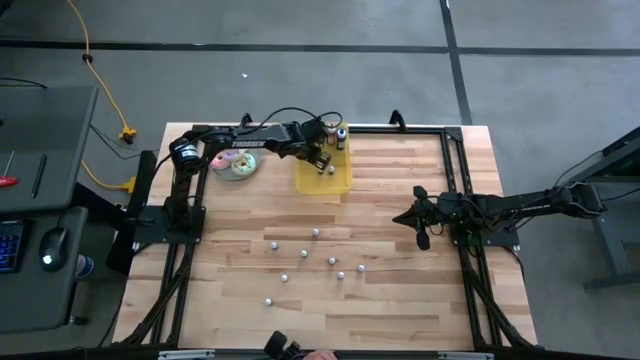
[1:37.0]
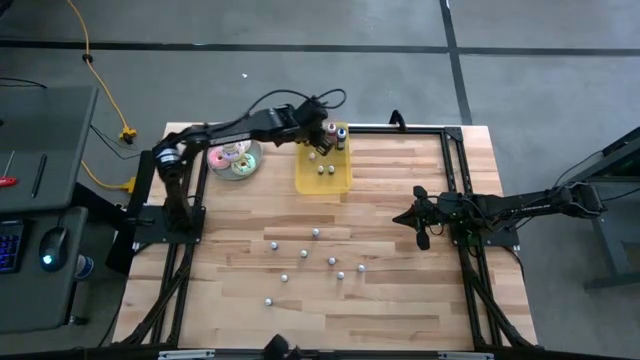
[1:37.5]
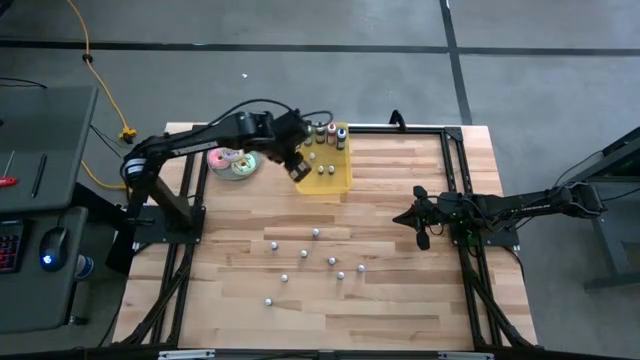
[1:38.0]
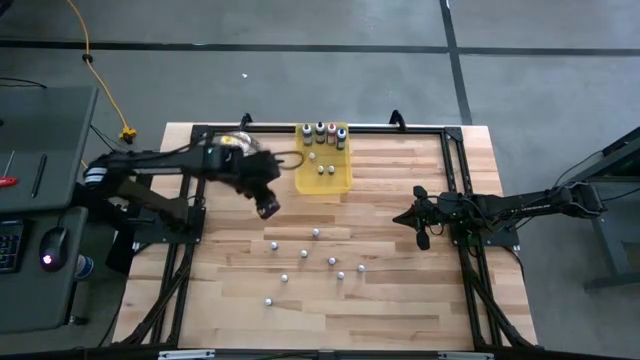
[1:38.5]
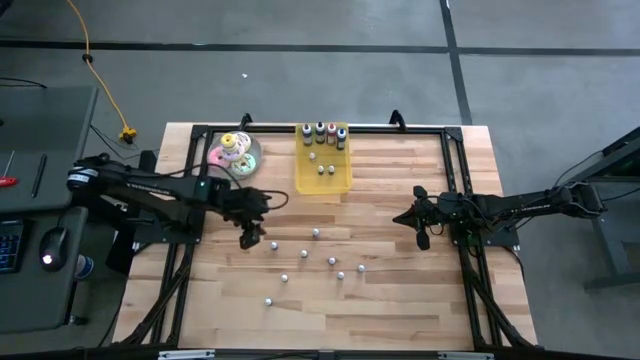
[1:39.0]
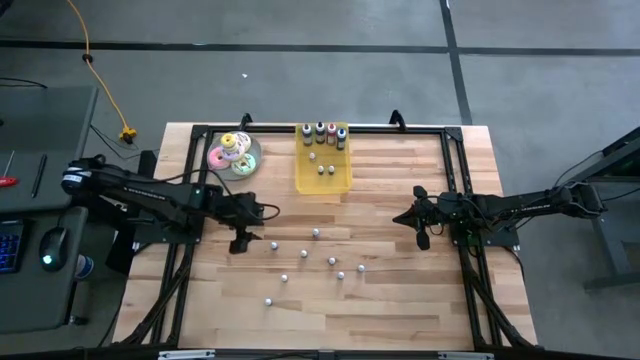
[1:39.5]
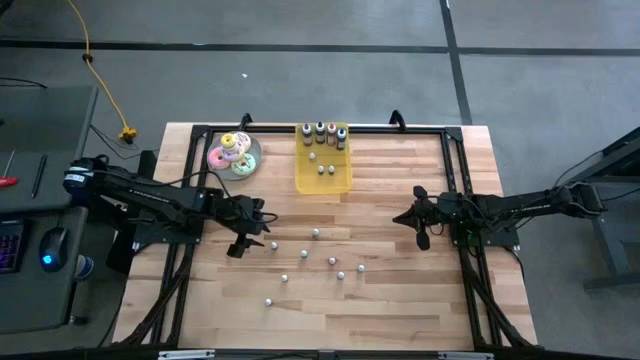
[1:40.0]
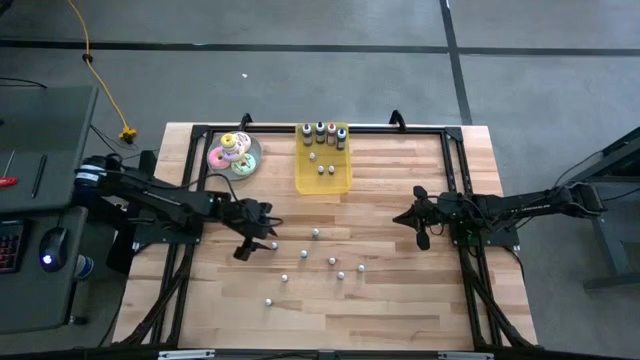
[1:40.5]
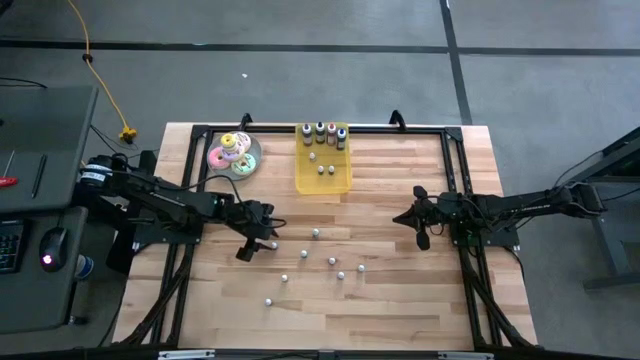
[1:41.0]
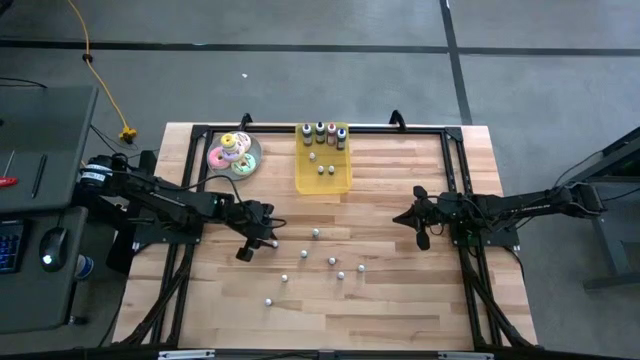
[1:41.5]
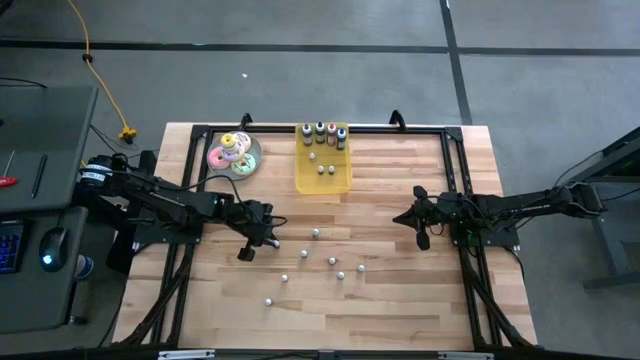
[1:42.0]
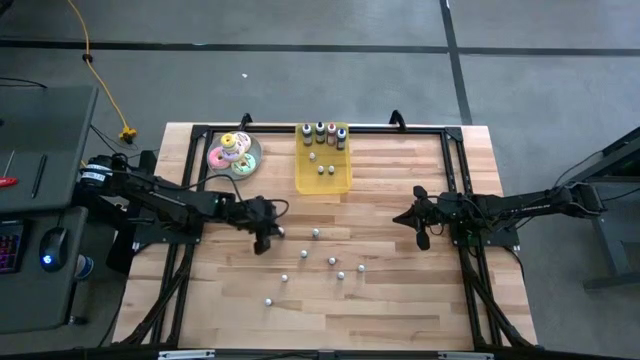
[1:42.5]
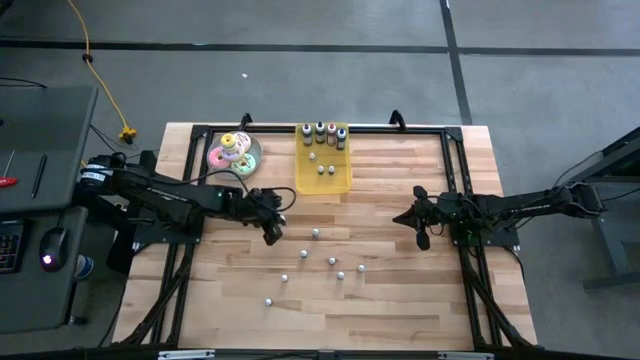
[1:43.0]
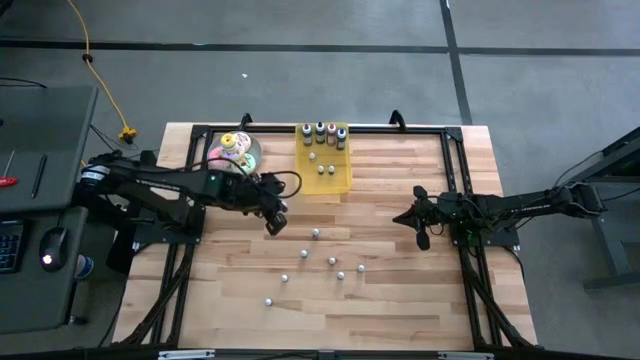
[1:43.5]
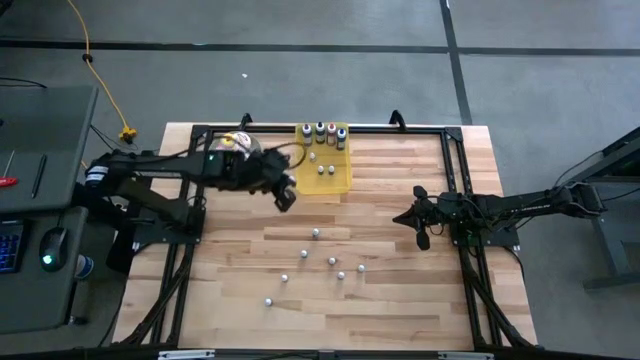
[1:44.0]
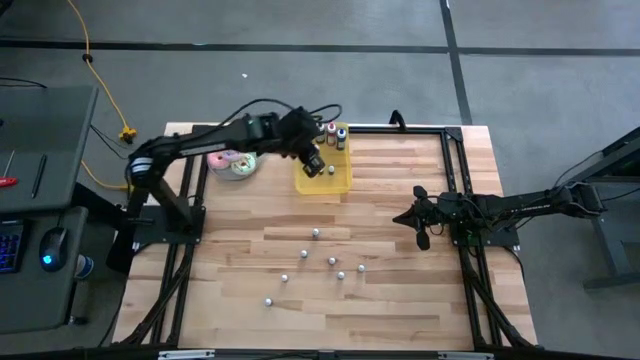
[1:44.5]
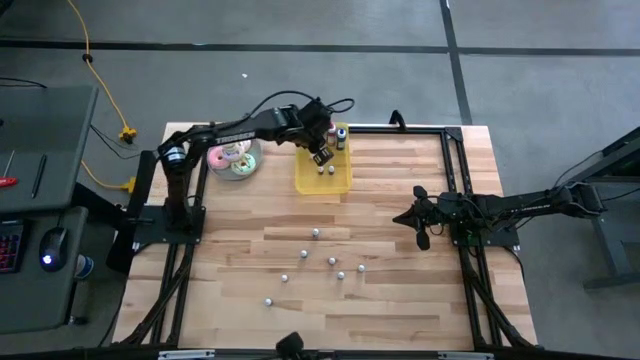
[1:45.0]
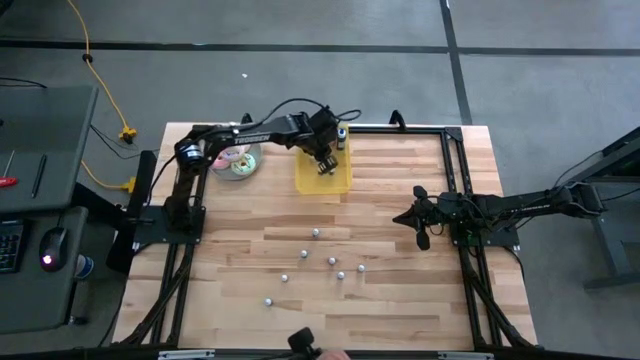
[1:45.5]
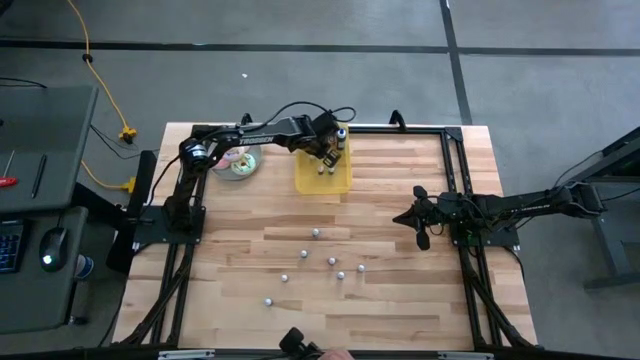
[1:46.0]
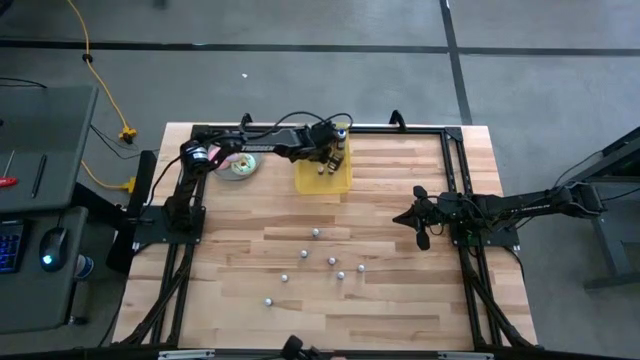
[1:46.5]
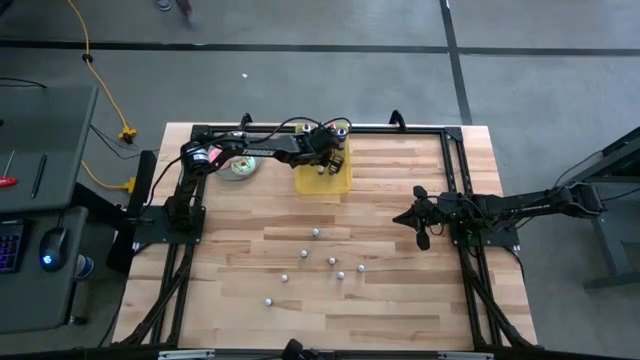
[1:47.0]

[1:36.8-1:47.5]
Task: Pick & Place food coloring
Put the top small purple food coloring bottle into the yellow bin

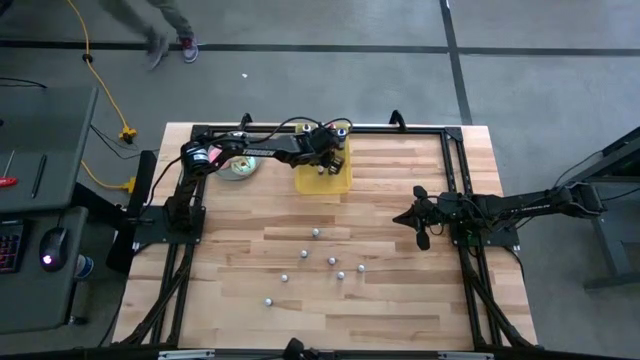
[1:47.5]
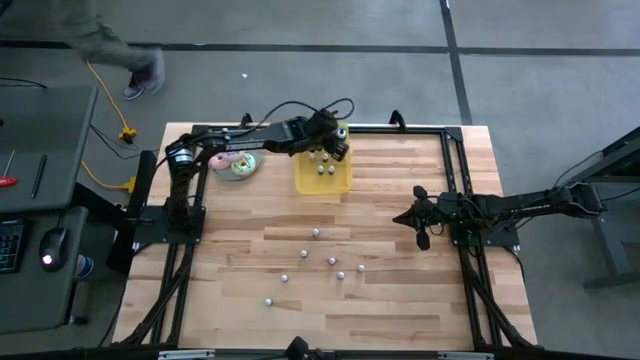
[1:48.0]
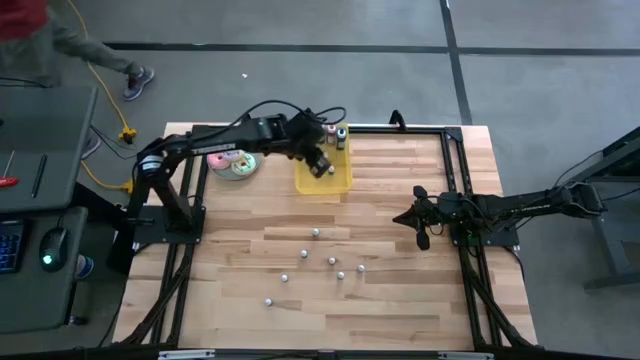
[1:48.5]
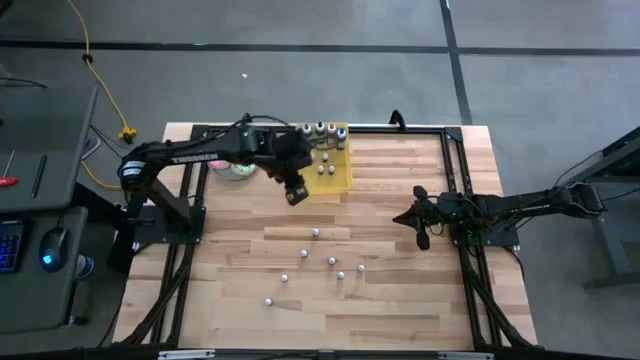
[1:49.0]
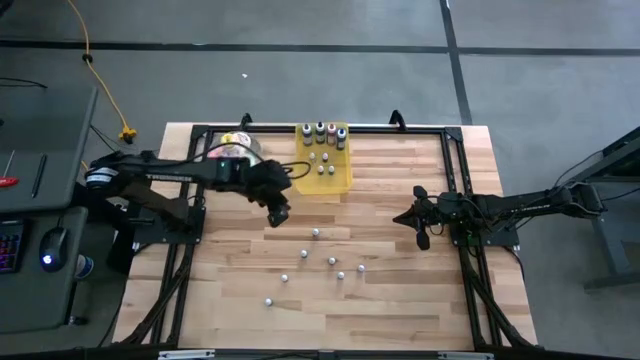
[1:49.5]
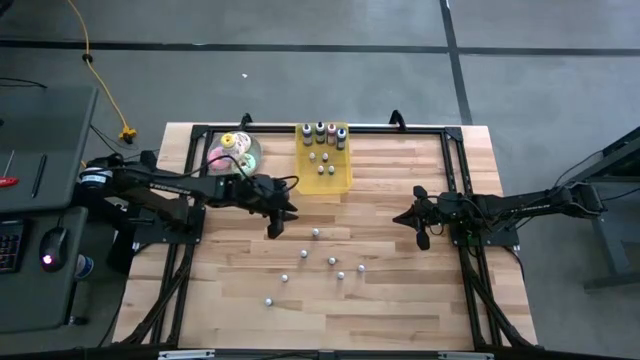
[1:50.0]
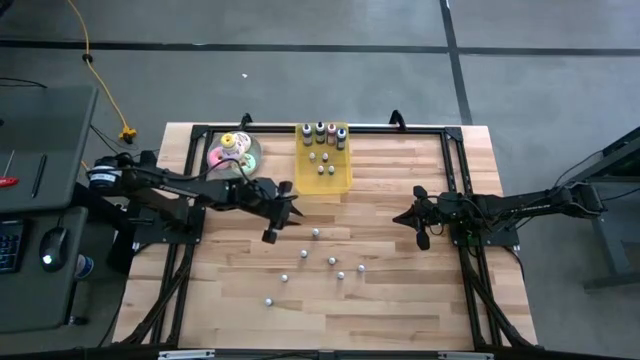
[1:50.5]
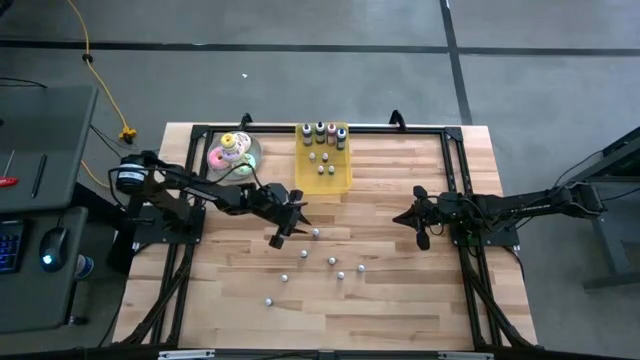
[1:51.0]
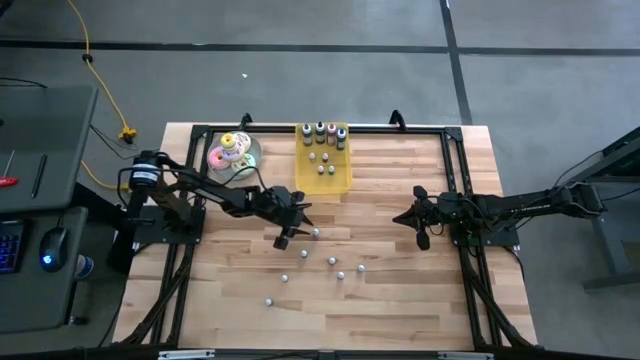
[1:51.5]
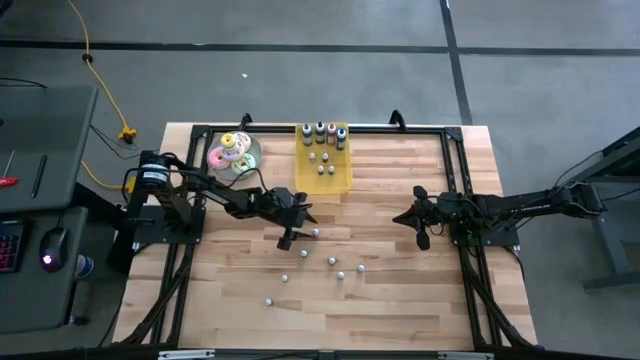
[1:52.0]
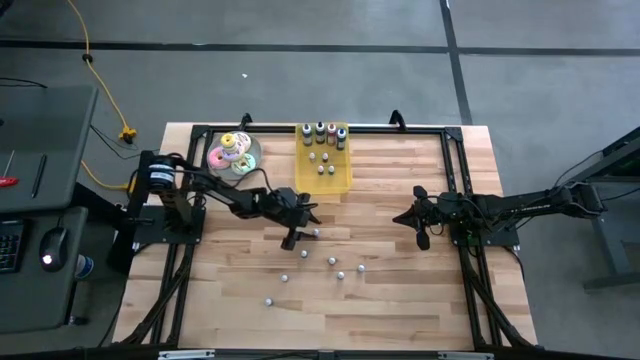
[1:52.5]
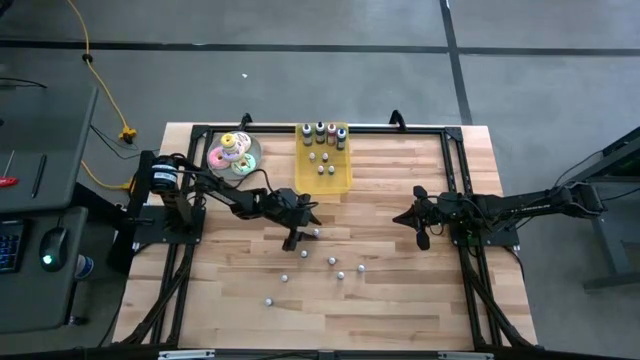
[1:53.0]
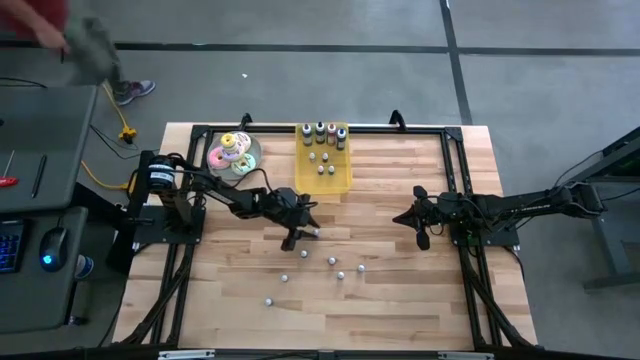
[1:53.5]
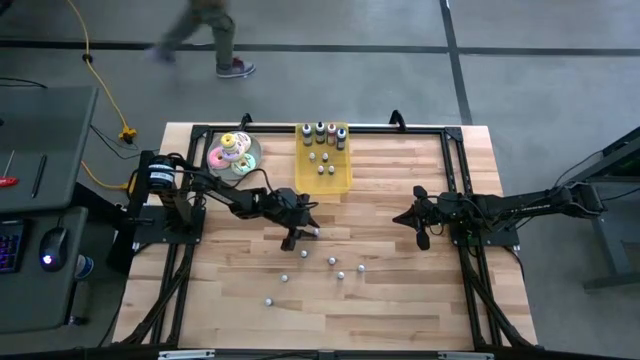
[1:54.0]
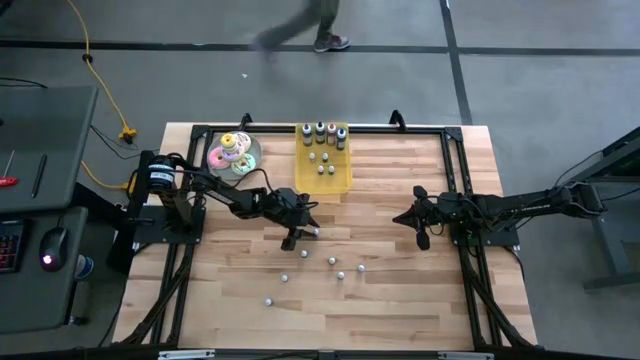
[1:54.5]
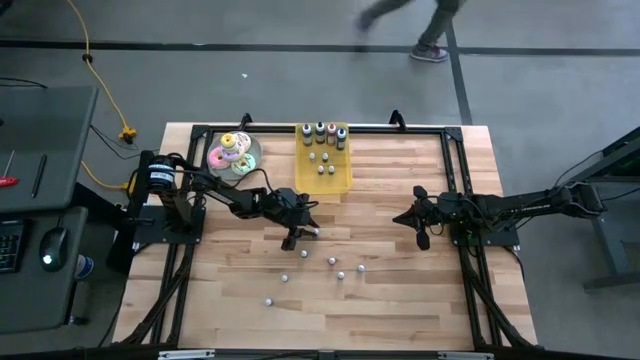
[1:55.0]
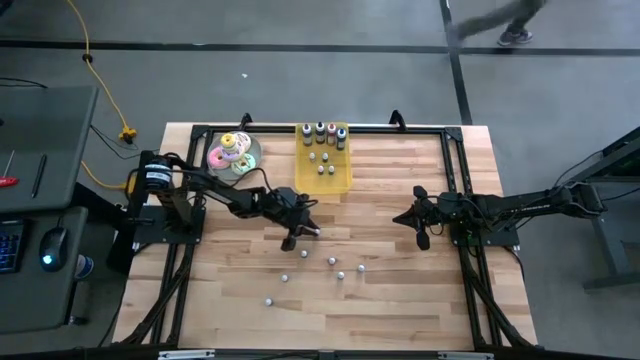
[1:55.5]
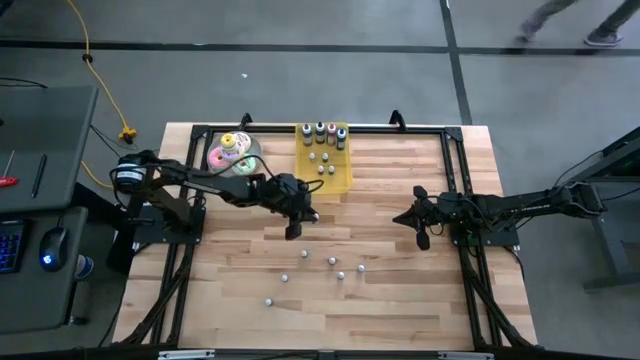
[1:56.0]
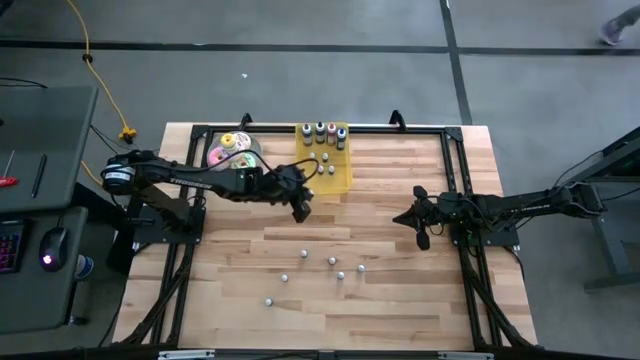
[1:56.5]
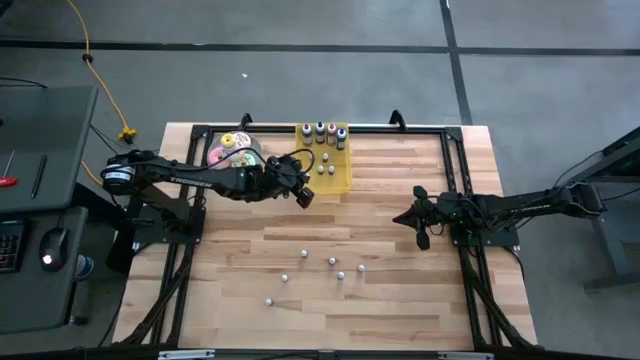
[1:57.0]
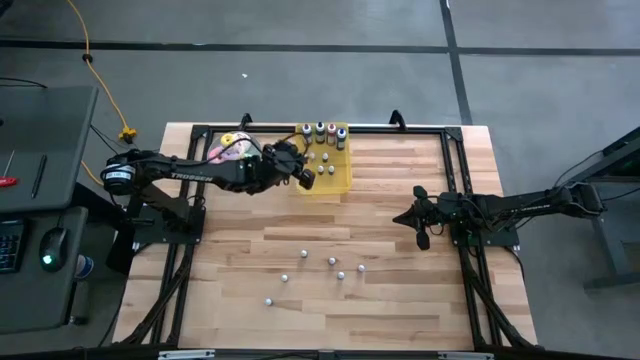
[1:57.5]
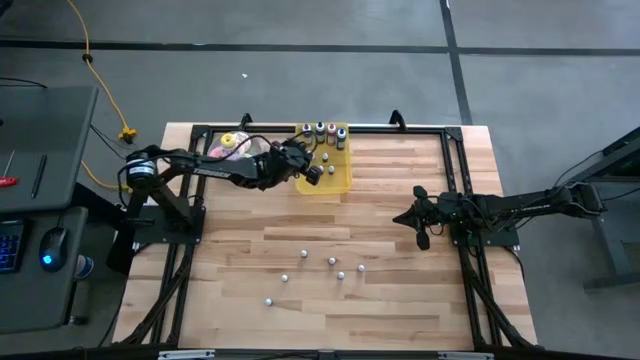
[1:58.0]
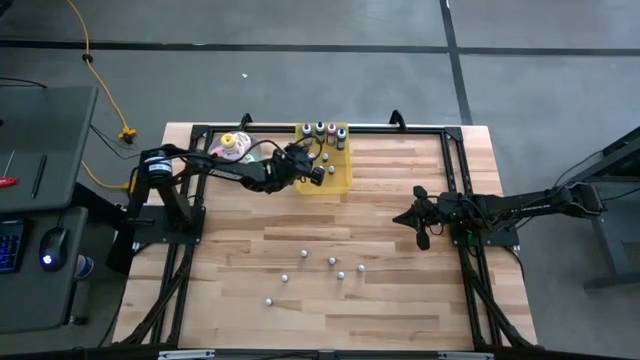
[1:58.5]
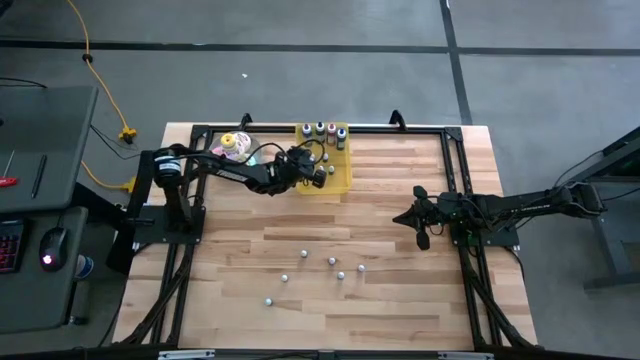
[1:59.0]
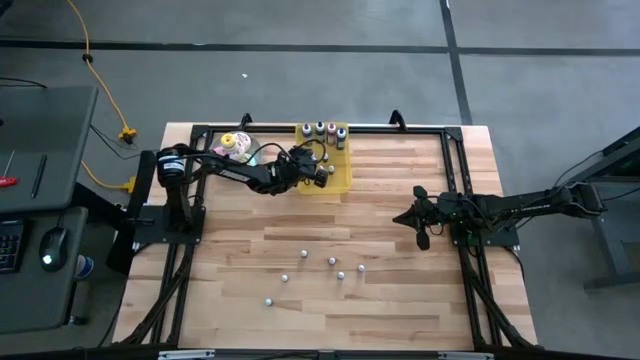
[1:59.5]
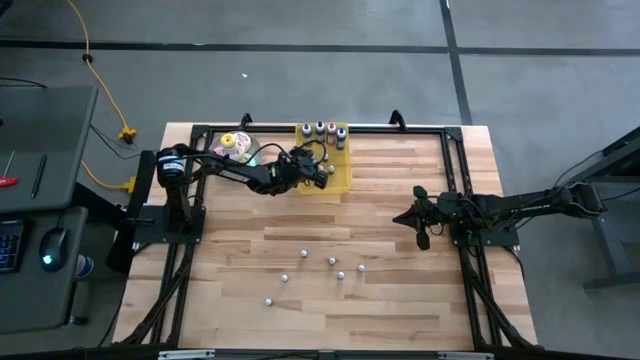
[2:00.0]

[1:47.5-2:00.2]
Put the small brown food coloring bottle into the yellow bin
